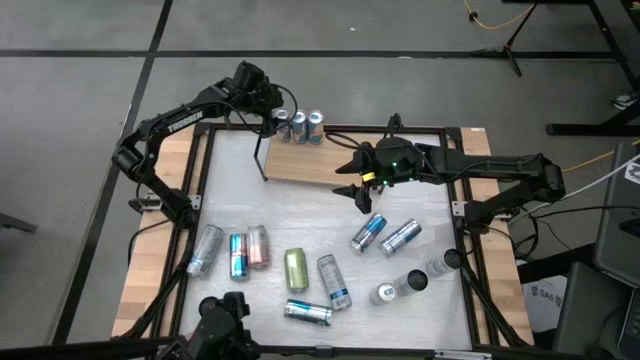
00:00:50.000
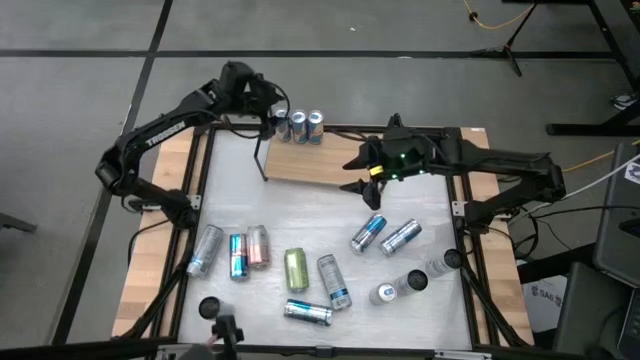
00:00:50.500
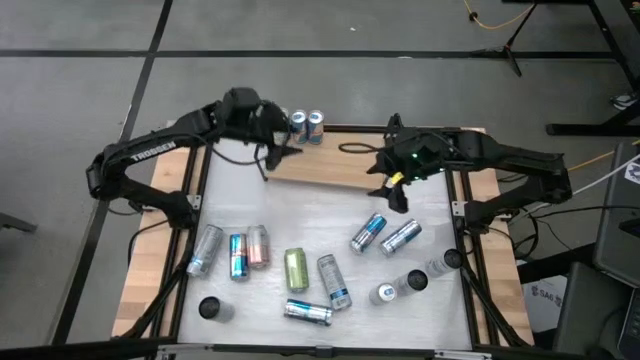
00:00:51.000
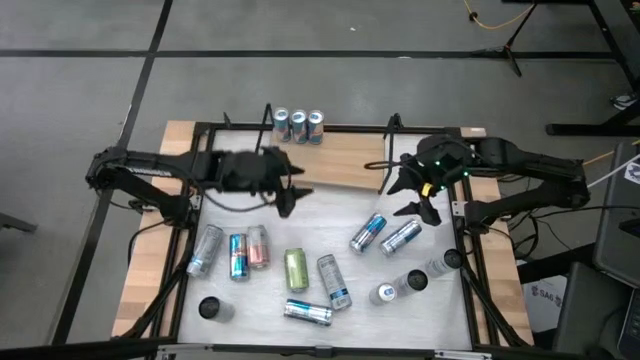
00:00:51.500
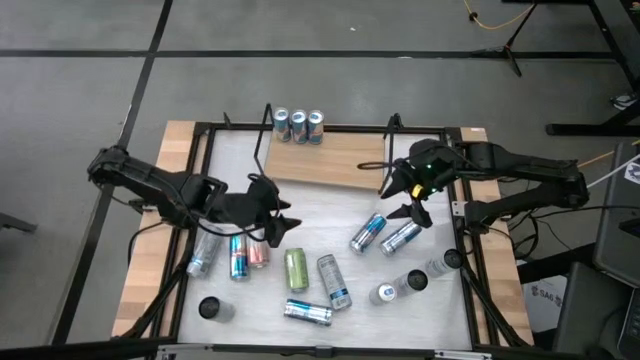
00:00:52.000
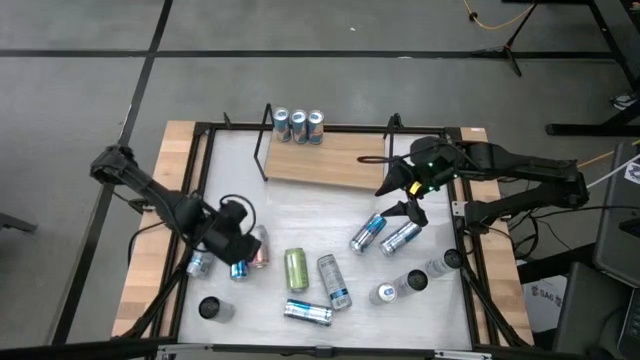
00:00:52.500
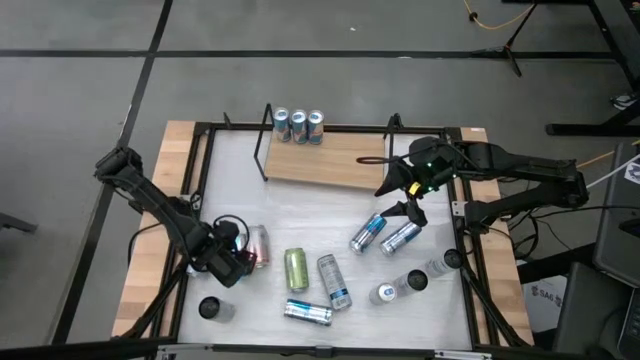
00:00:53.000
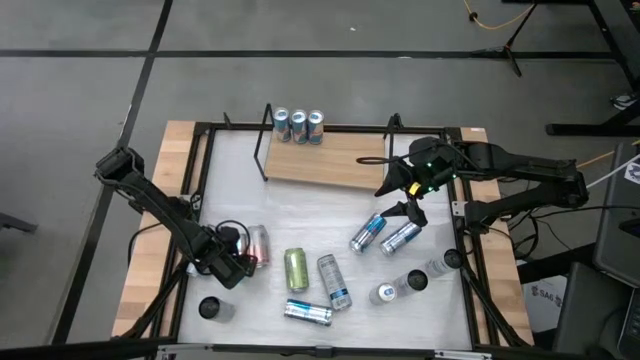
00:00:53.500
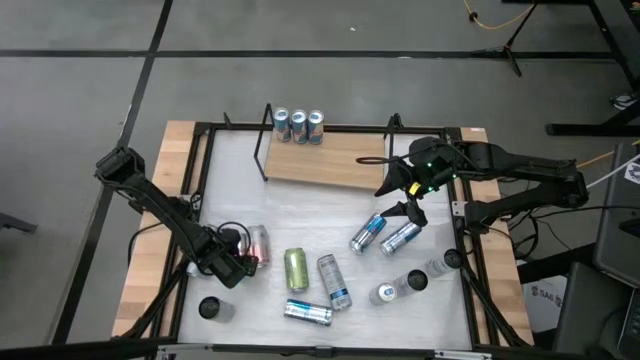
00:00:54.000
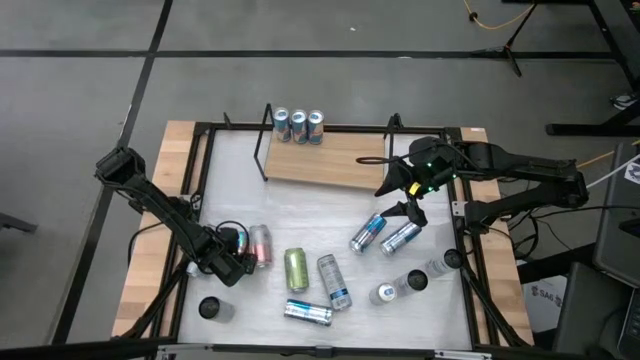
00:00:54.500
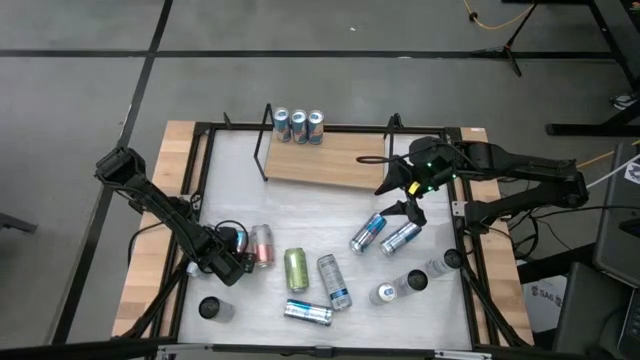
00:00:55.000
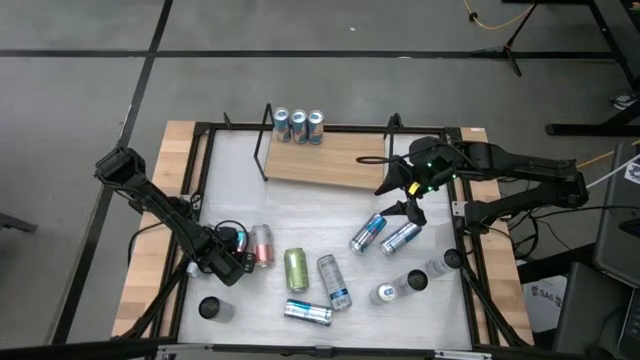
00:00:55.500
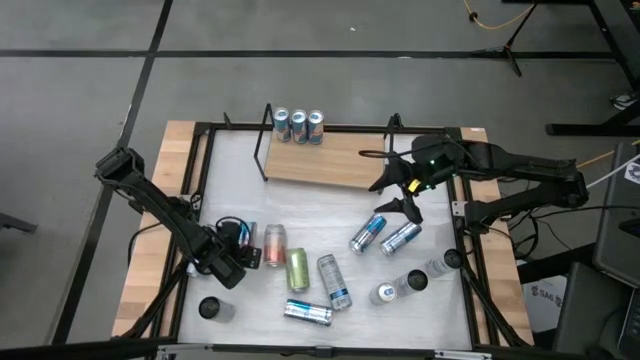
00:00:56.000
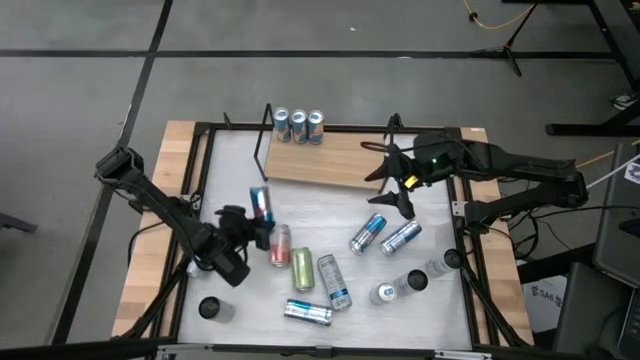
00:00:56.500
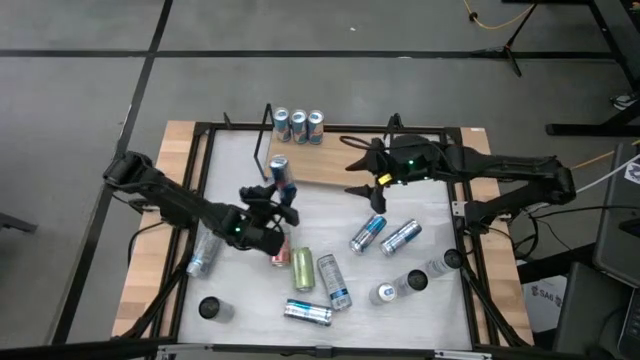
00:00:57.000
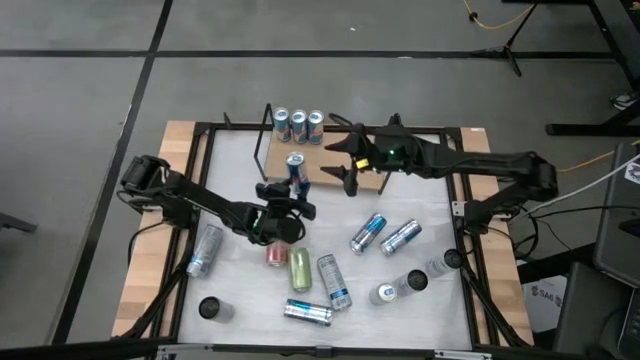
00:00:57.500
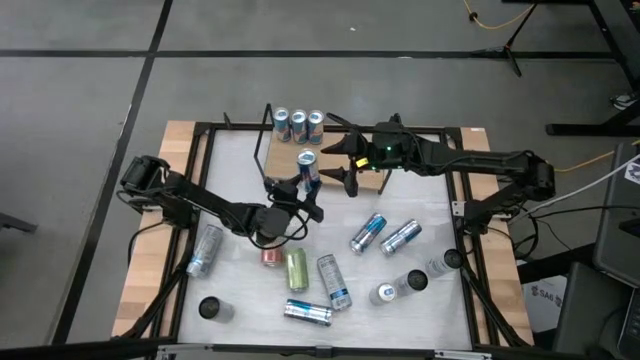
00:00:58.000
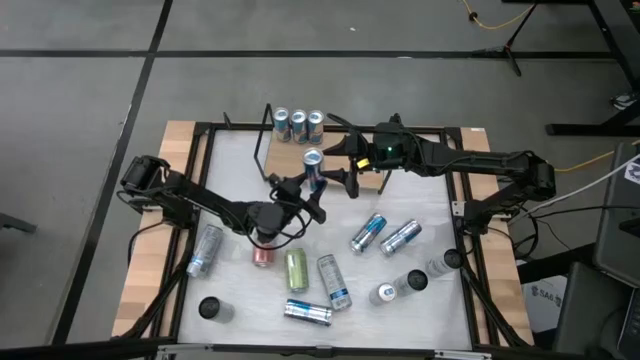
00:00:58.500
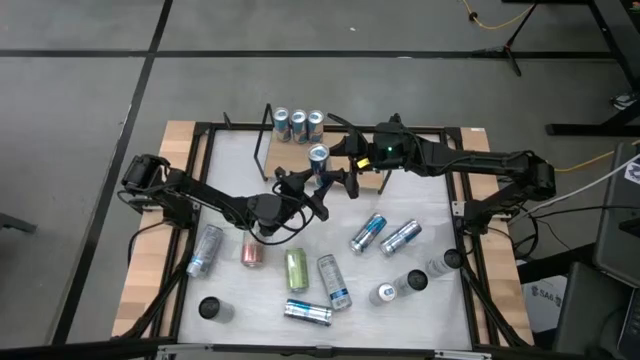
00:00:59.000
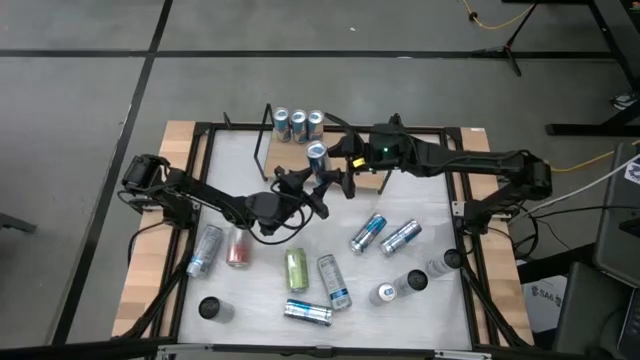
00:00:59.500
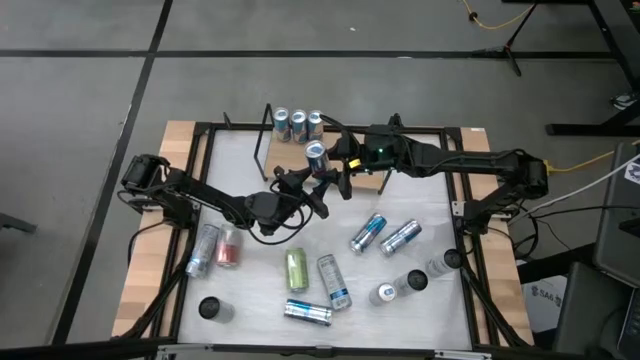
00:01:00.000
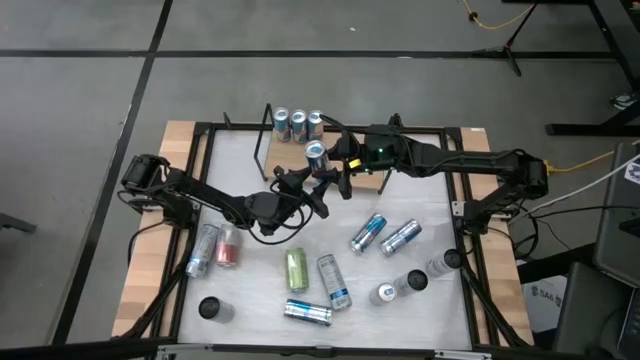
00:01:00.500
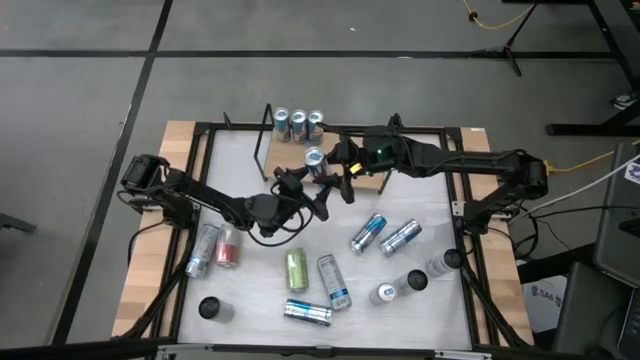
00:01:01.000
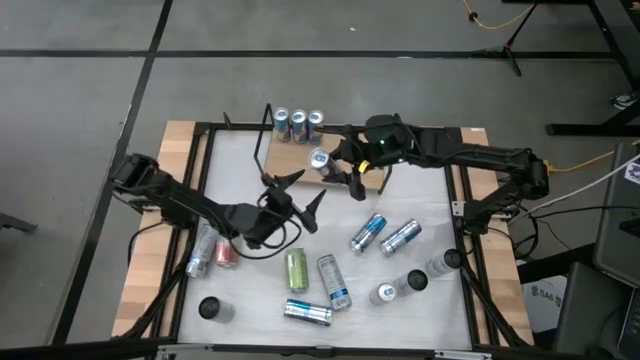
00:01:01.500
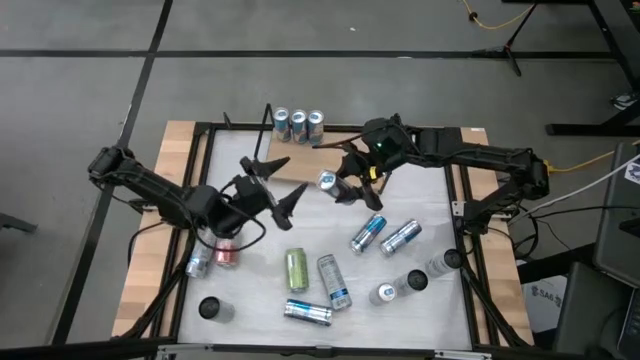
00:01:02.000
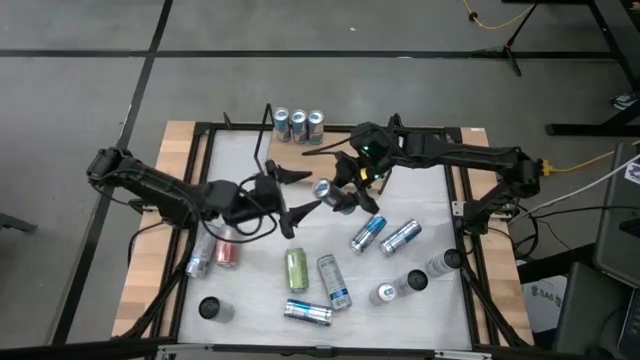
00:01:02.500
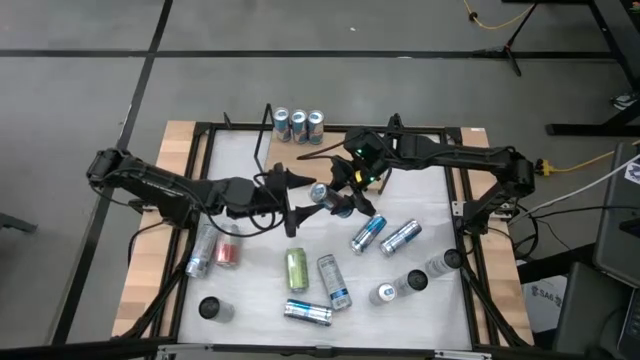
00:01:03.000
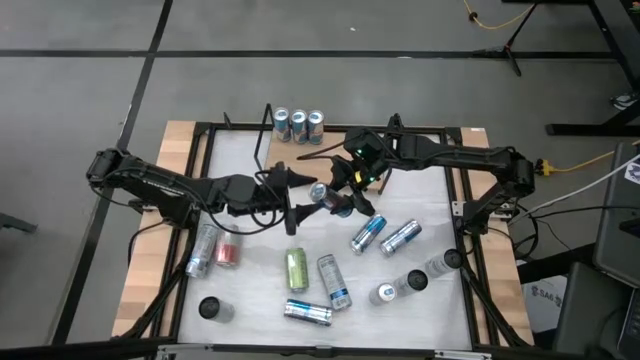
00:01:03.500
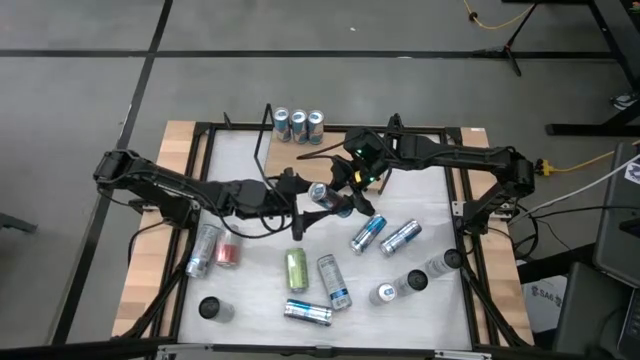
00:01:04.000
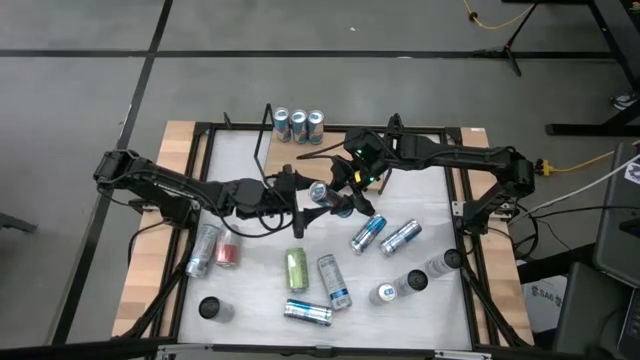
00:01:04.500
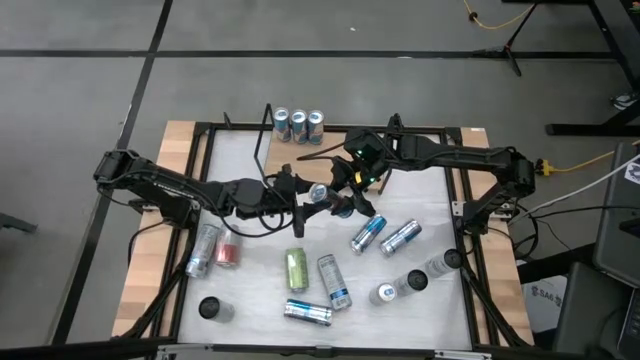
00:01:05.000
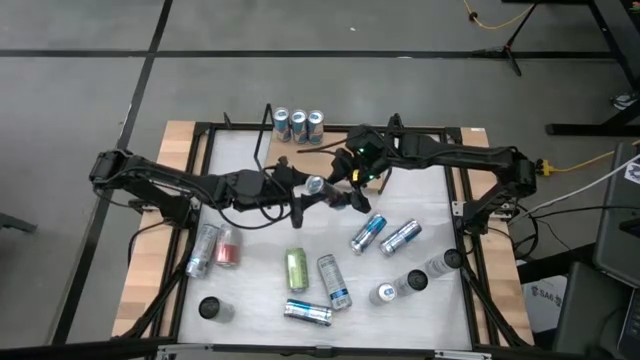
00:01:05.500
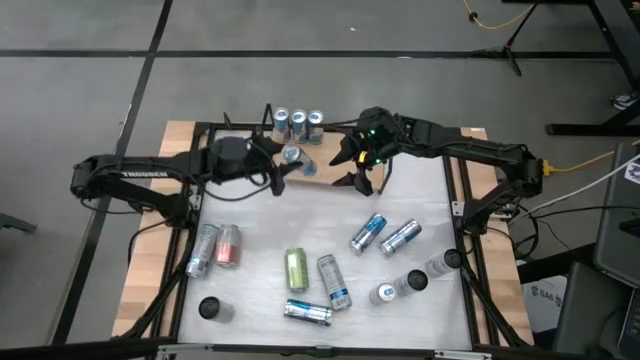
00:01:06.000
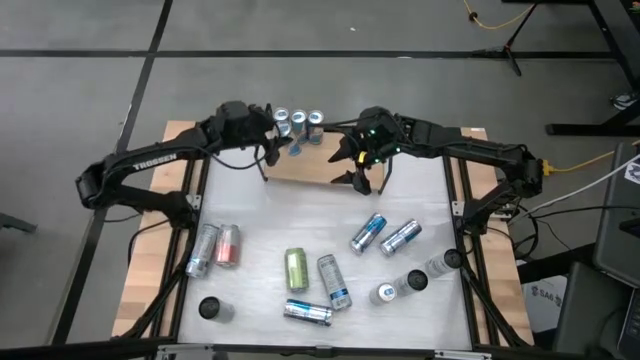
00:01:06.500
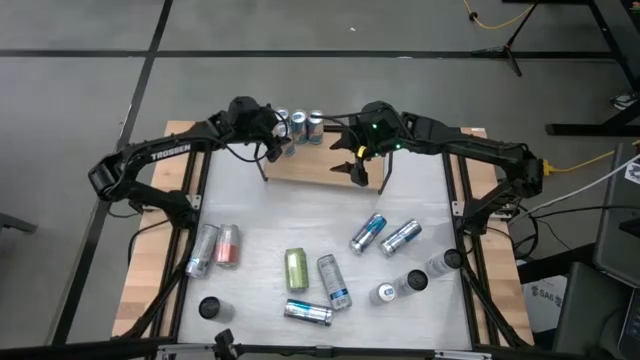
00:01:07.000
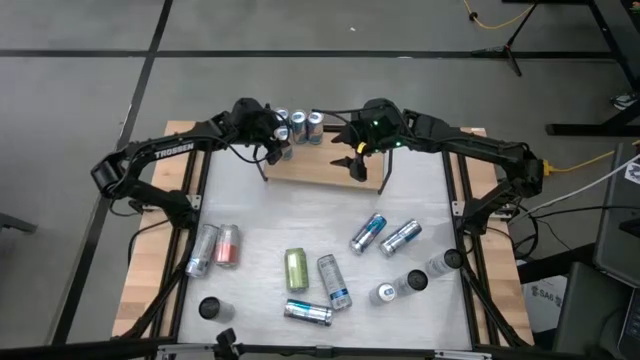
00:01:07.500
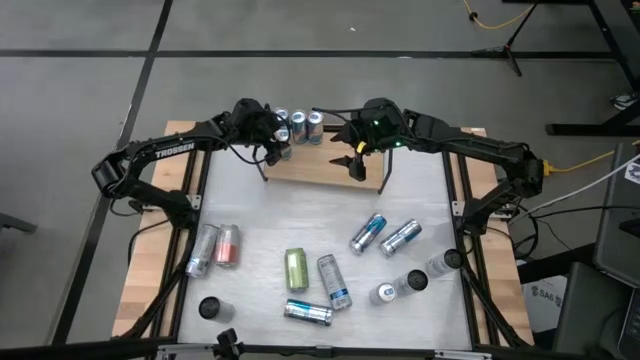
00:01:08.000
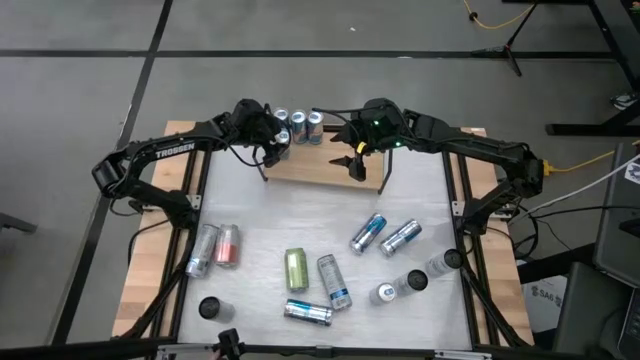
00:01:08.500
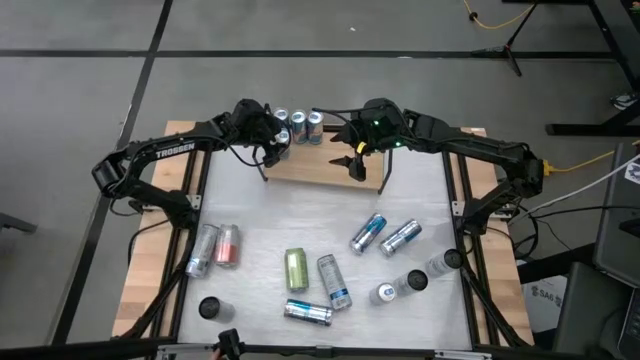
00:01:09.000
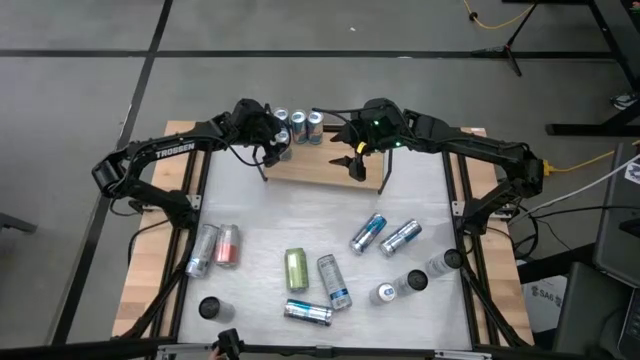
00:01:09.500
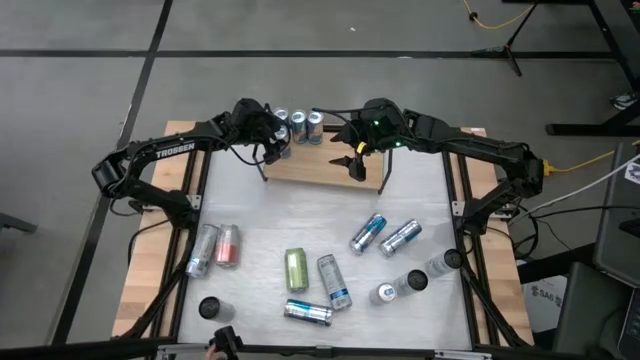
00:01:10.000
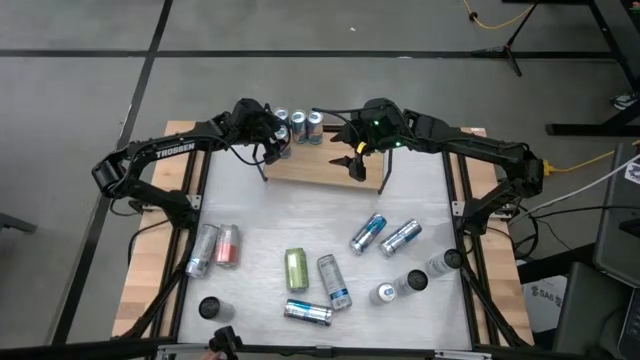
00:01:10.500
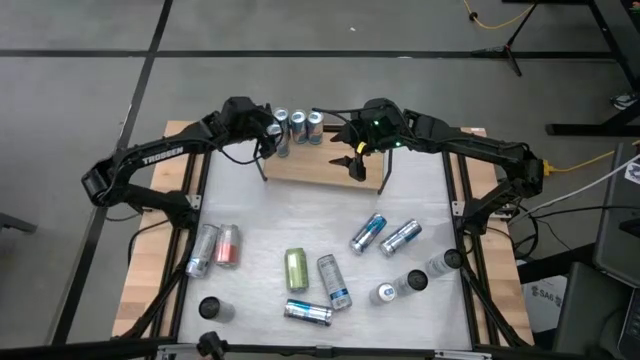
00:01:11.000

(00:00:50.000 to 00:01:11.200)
Task: Place canned beverage on shelf
Put the blue soda can on the shelf aligned with the other blue soda can

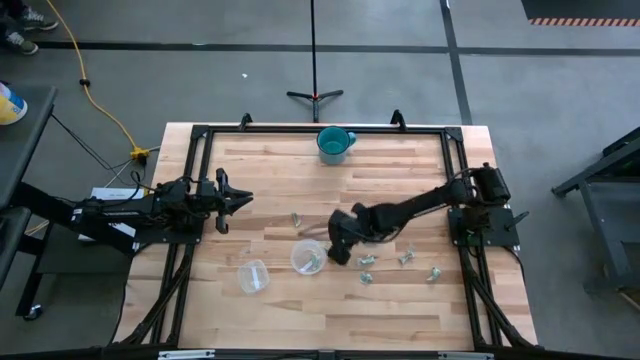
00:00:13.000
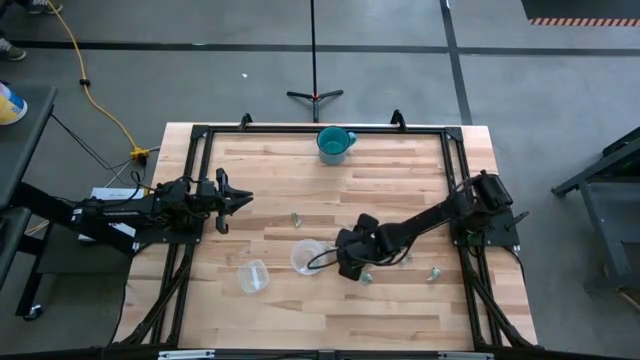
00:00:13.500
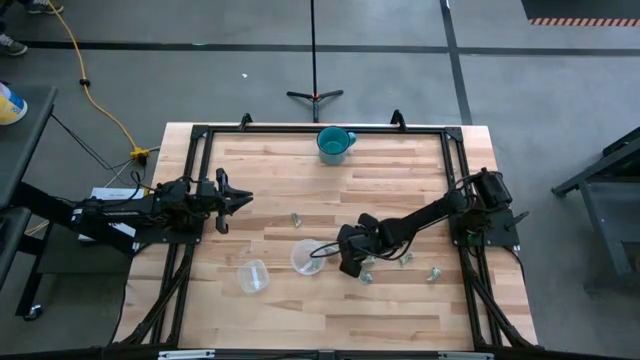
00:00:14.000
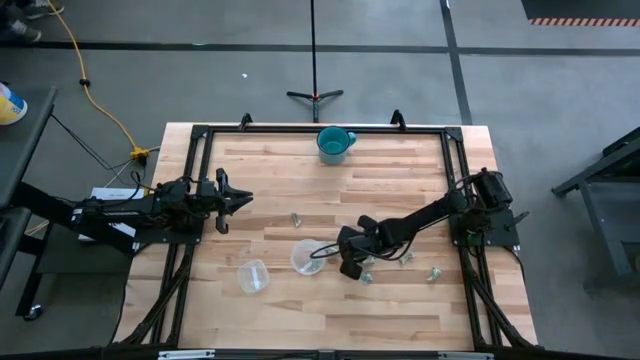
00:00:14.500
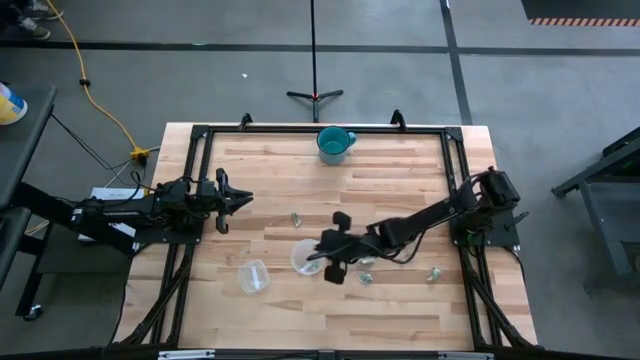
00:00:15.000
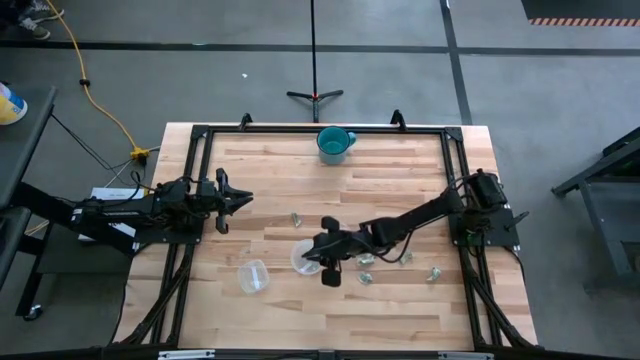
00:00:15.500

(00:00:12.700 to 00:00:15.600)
Task: Pick and place items into bin
Put the stevia packet into the right transparent bin
